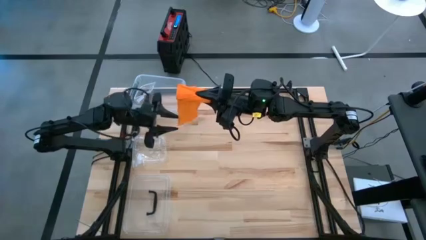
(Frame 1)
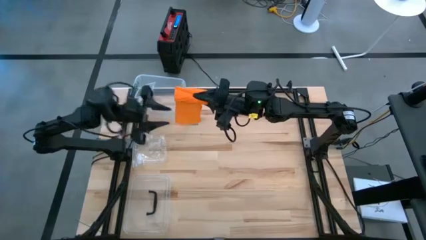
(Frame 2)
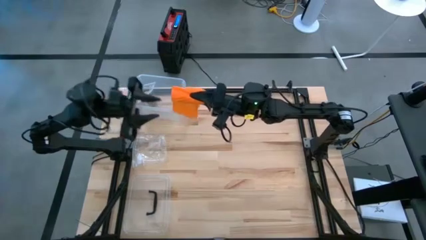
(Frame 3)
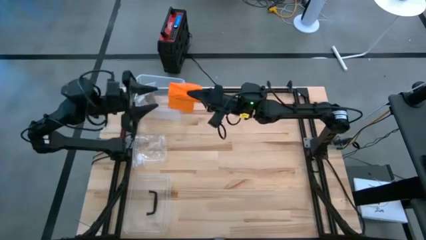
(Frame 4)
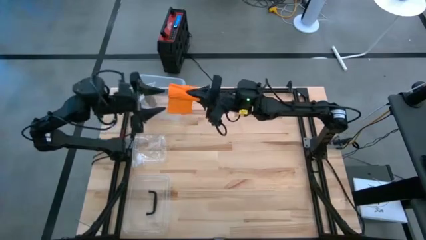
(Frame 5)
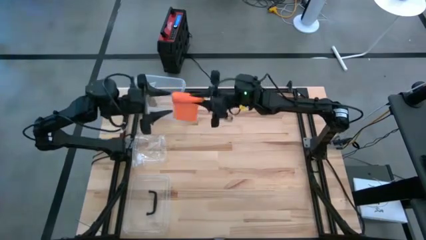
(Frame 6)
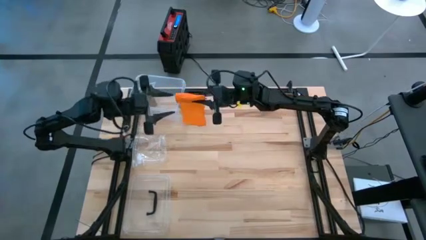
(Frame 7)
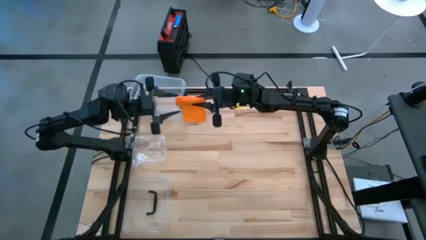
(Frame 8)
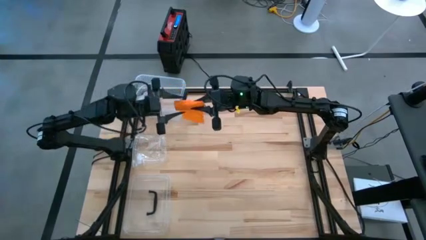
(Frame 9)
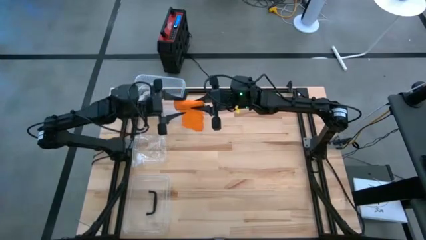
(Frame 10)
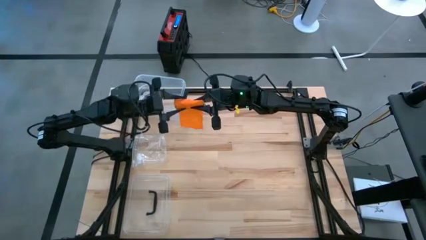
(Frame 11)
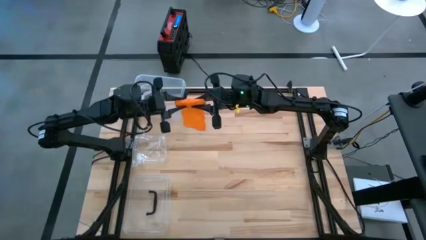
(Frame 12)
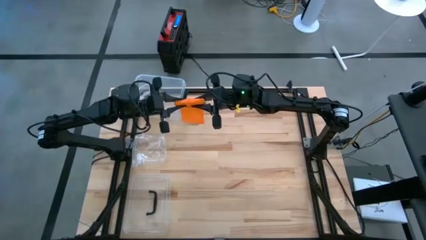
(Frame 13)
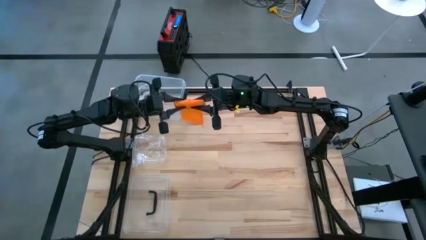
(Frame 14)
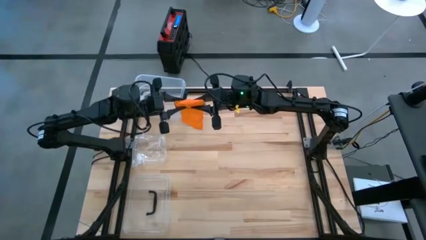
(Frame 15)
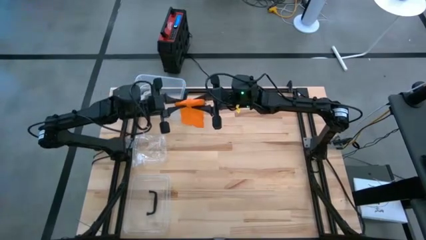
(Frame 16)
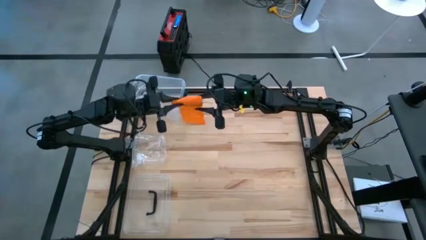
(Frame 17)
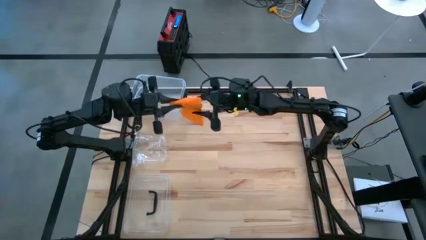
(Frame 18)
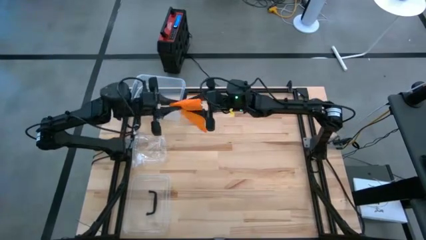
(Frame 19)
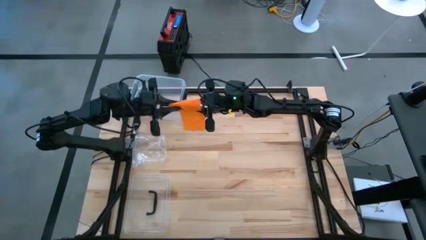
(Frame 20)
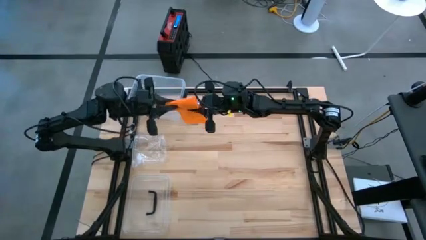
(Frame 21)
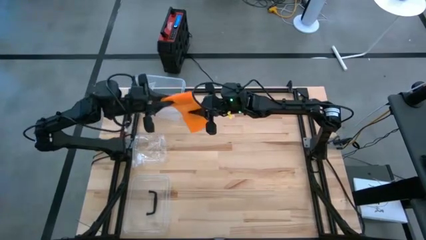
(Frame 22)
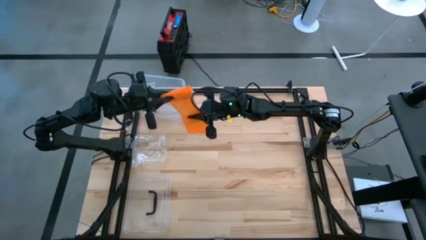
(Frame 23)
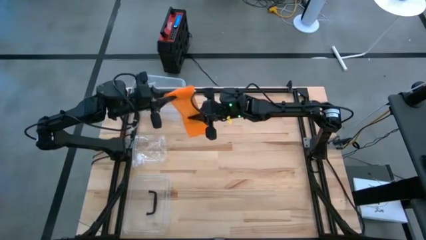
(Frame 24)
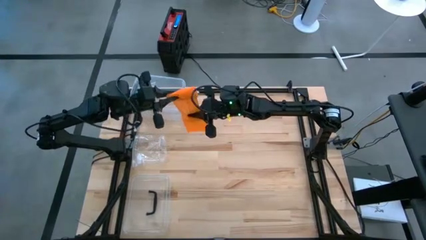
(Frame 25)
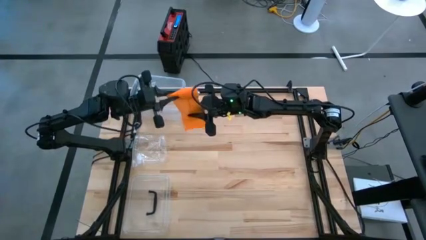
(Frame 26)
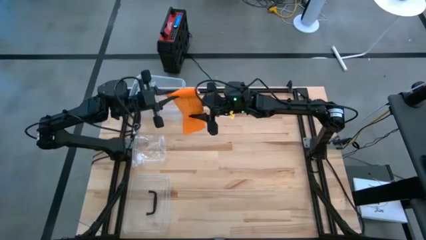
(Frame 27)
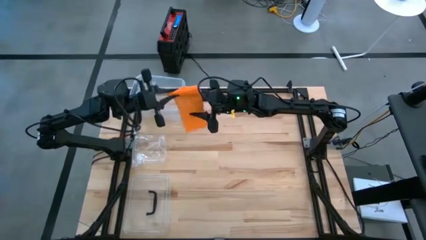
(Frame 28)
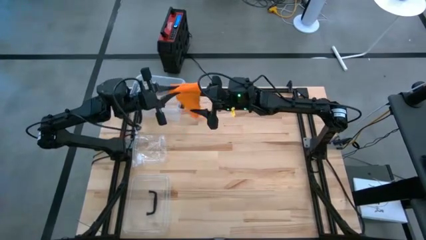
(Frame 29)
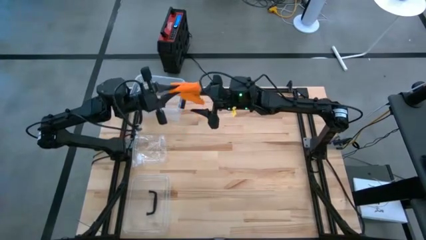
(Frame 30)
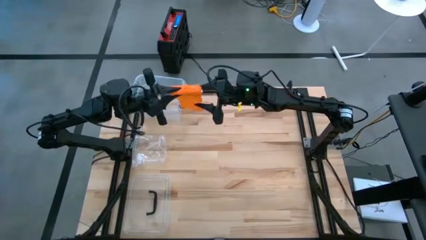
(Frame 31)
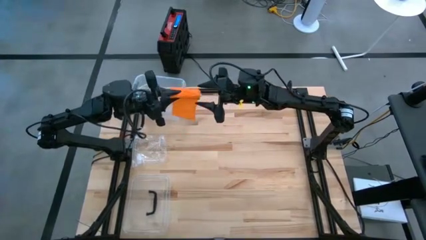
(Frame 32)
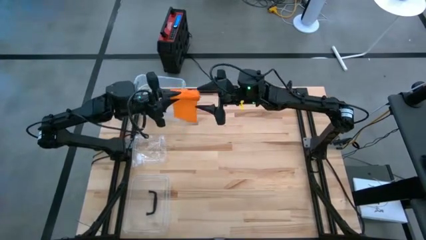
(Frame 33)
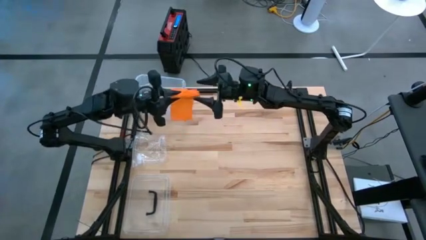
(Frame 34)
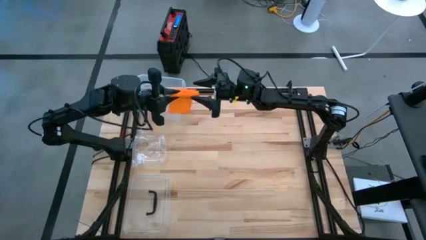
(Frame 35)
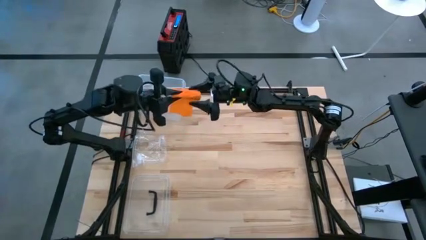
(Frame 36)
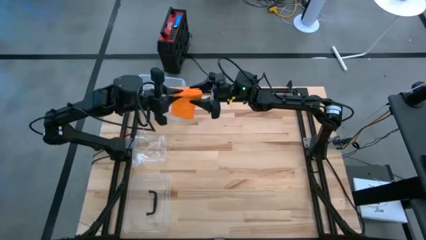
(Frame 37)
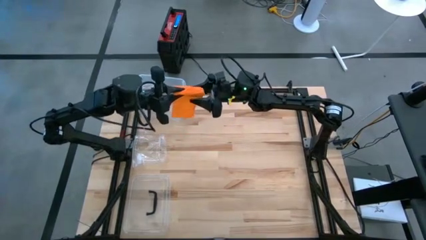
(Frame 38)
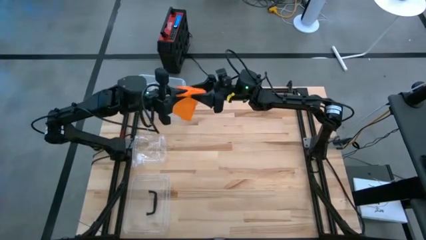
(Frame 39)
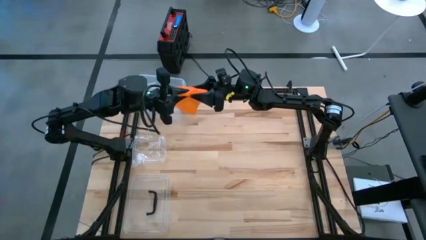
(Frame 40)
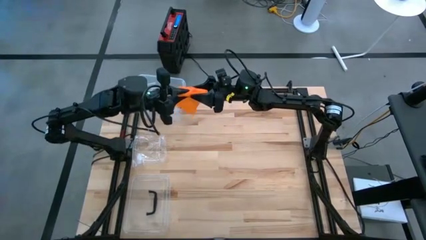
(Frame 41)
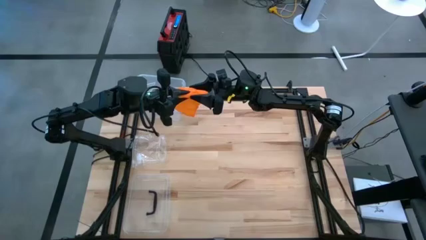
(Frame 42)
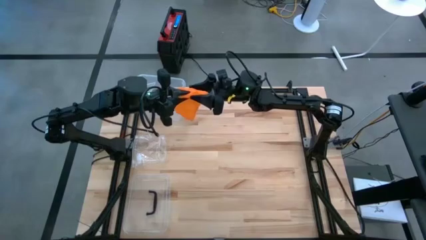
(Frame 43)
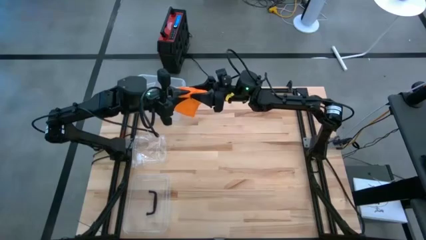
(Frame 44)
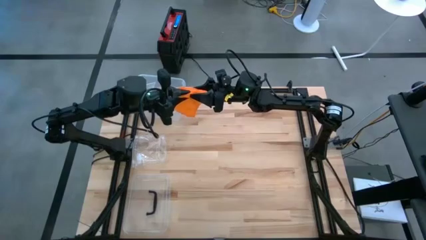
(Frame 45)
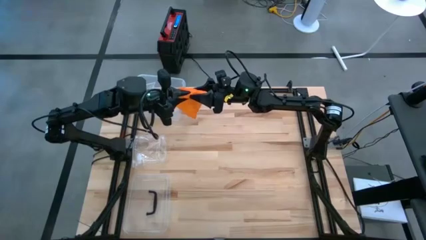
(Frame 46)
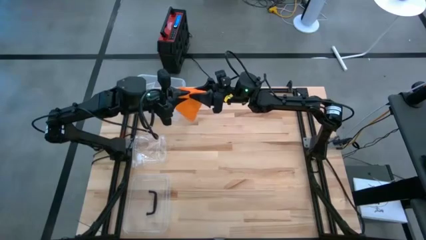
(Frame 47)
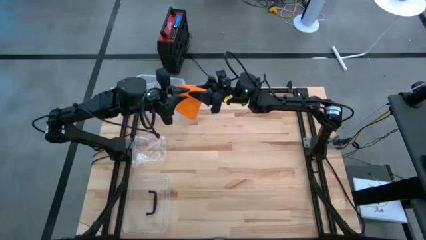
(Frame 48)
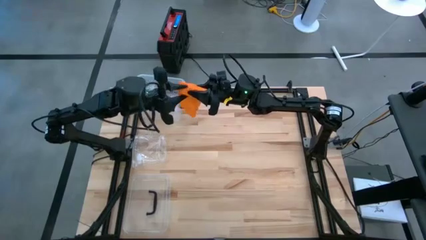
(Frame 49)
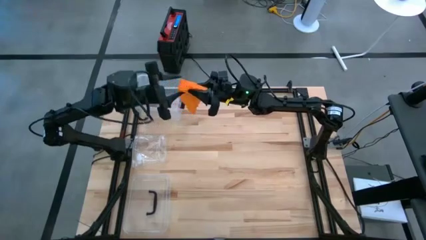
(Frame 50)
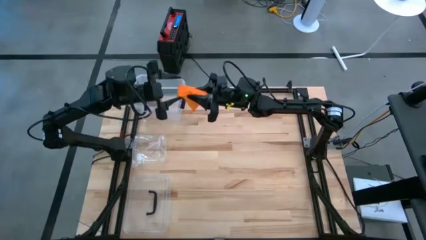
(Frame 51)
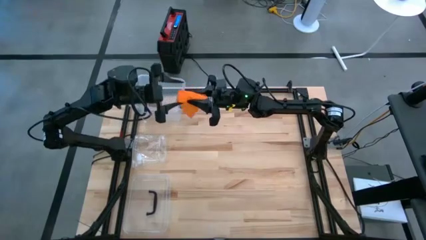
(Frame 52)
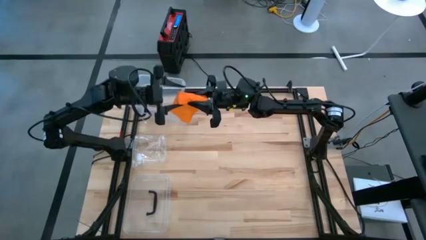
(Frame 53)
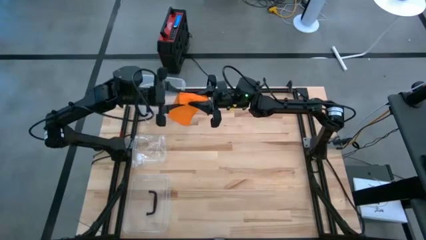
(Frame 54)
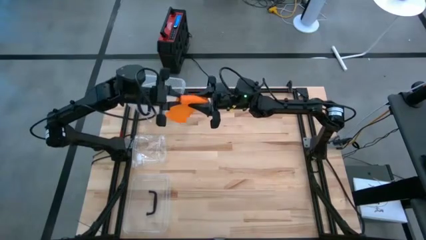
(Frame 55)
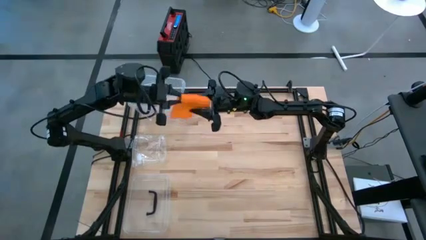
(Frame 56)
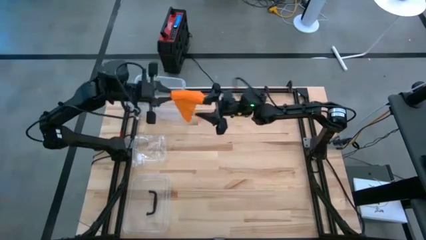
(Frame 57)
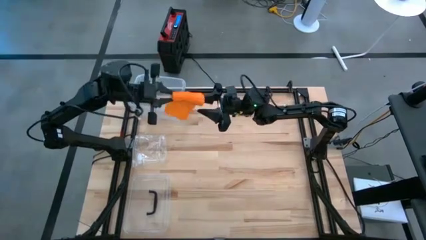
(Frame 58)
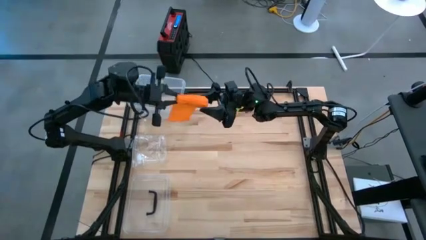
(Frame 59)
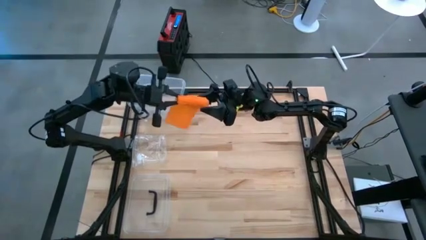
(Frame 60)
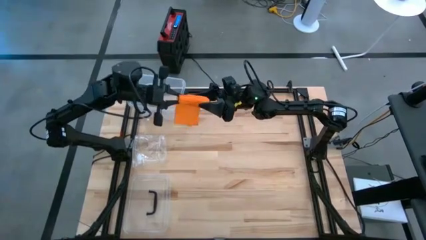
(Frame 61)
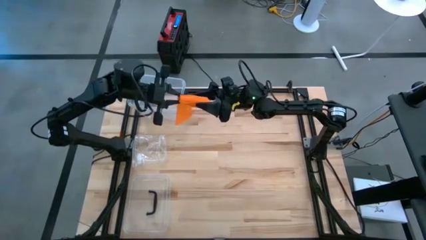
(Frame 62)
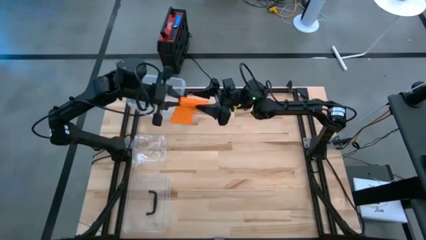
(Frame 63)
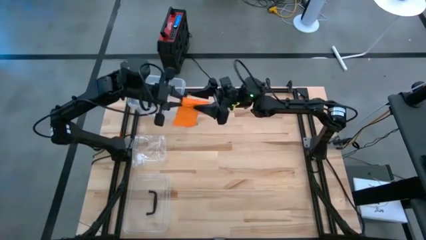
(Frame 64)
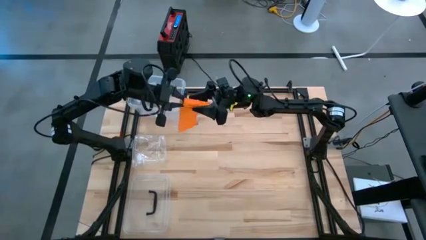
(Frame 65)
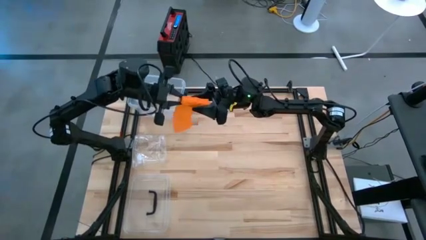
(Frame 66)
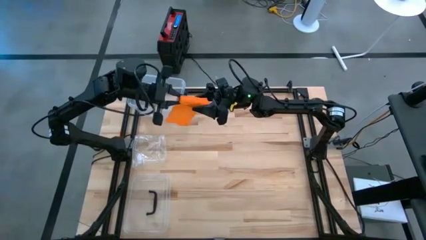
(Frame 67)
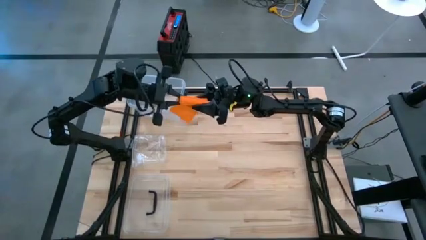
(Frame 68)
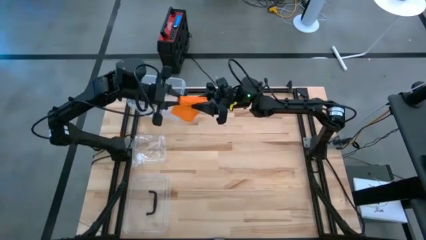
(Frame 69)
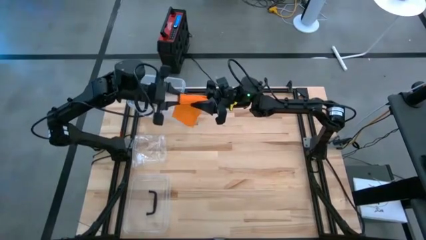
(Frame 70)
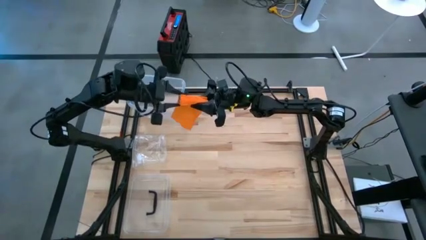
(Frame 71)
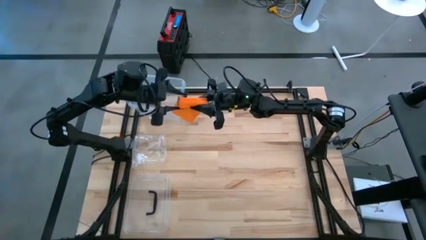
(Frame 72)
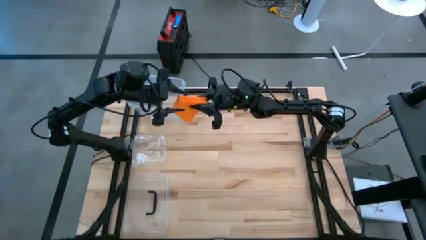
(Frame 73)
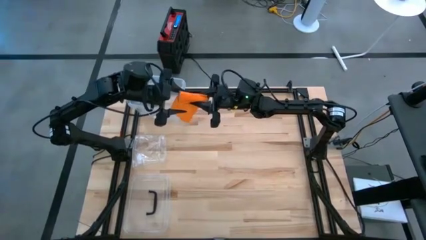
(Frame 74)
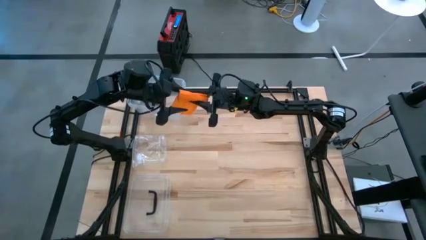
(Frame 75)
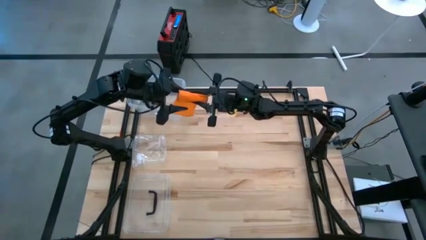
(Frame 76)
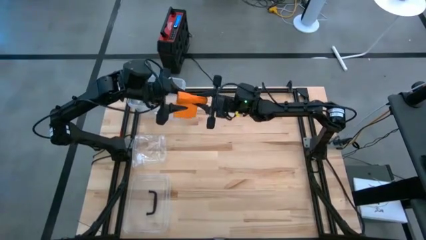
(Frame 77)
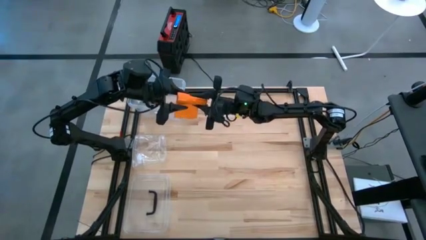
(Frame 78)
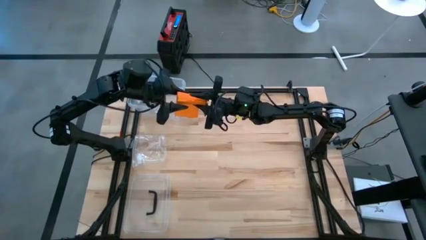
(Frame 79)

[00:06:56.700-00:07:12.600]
Task: Roll bandage
Roll the orange bandage
